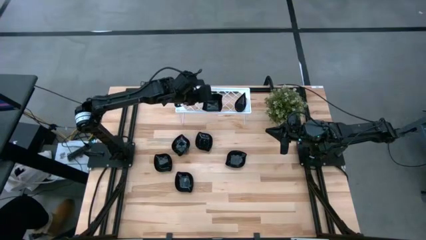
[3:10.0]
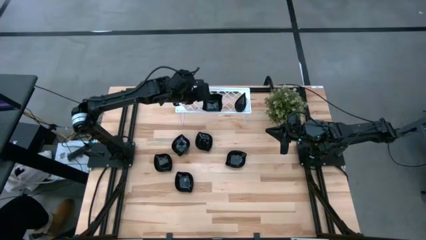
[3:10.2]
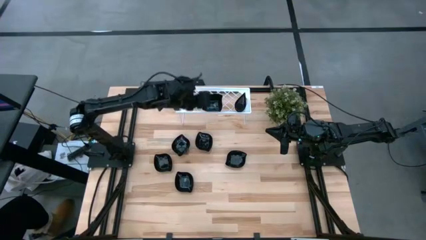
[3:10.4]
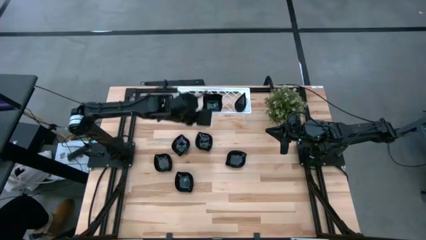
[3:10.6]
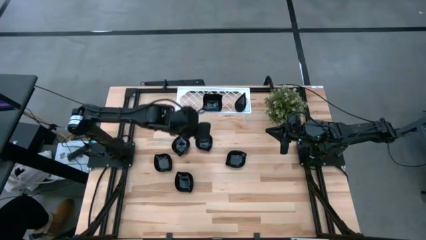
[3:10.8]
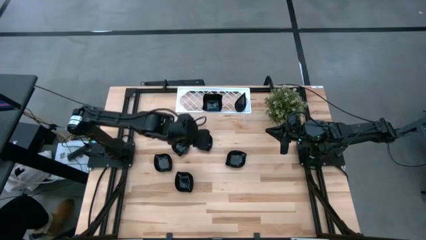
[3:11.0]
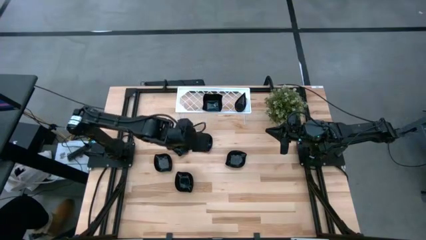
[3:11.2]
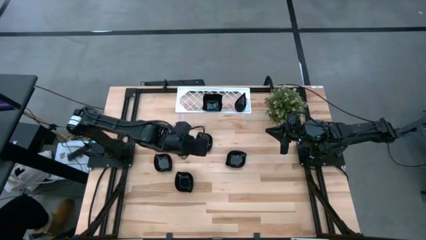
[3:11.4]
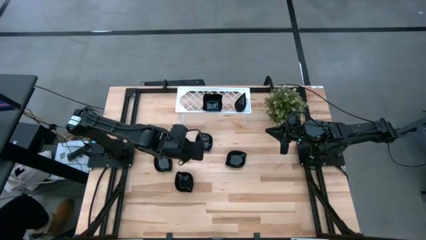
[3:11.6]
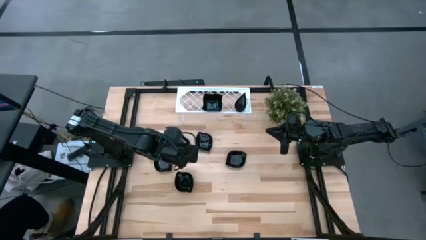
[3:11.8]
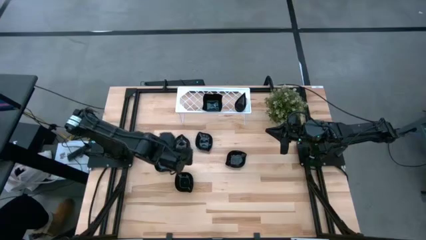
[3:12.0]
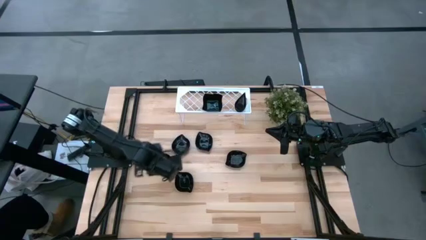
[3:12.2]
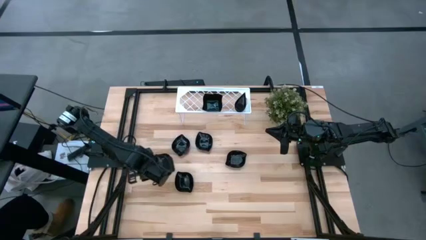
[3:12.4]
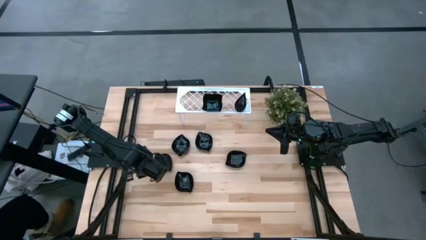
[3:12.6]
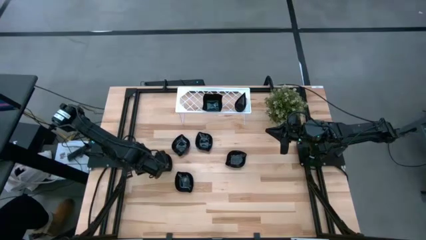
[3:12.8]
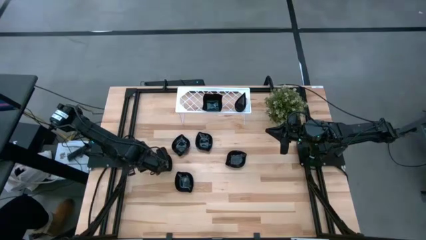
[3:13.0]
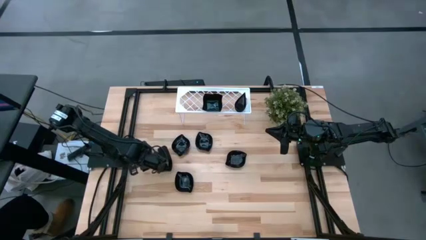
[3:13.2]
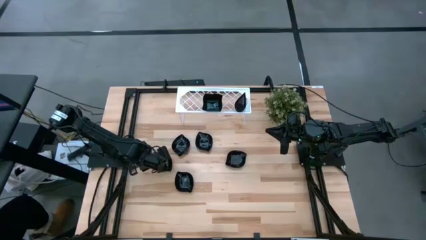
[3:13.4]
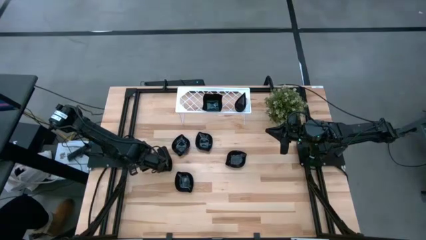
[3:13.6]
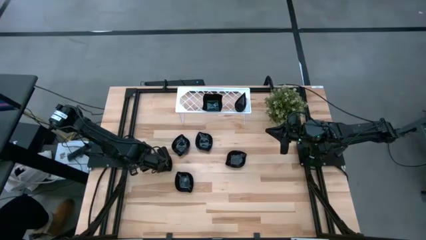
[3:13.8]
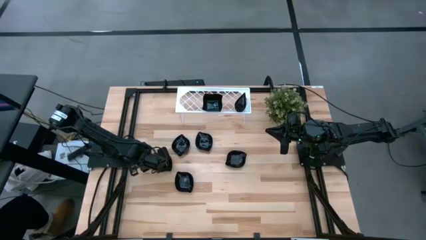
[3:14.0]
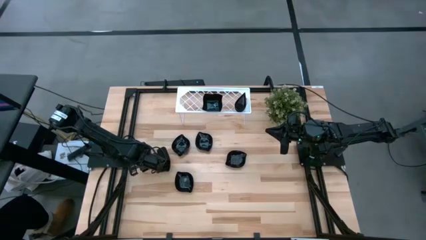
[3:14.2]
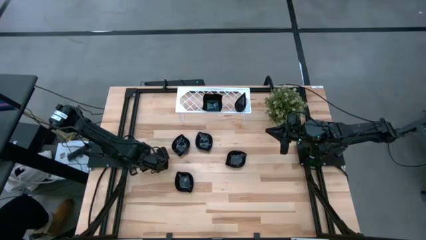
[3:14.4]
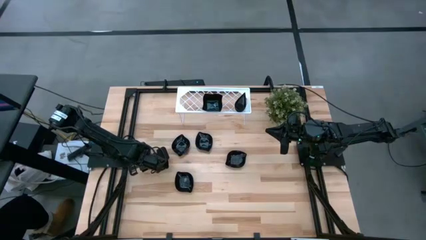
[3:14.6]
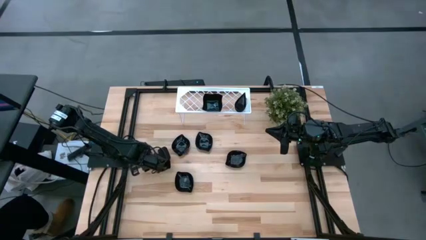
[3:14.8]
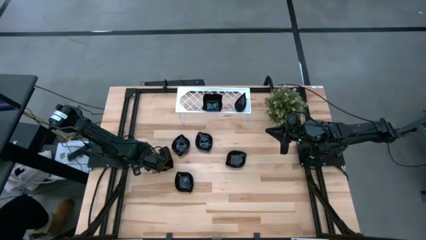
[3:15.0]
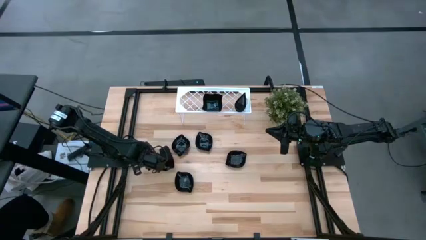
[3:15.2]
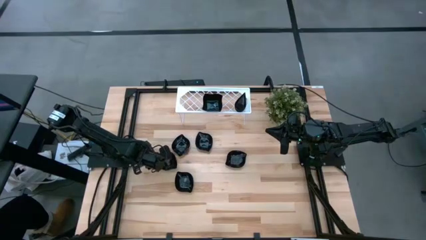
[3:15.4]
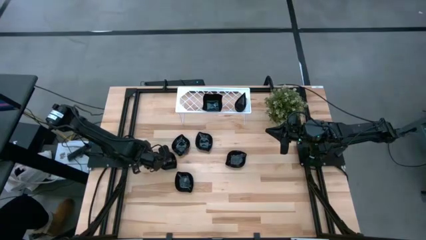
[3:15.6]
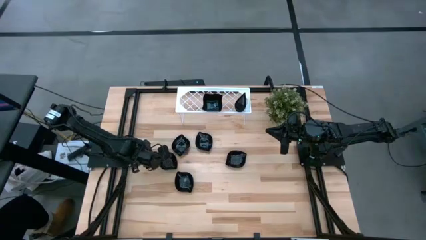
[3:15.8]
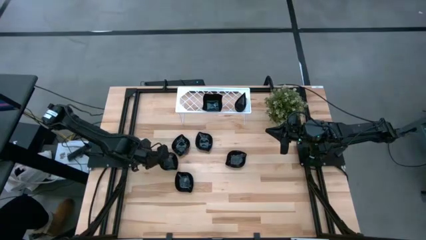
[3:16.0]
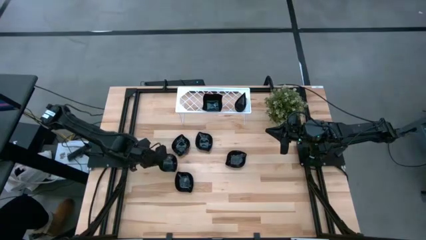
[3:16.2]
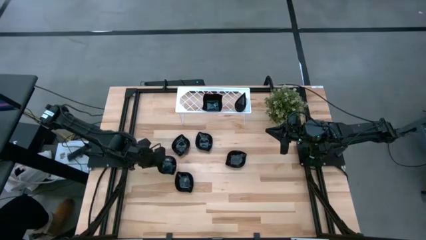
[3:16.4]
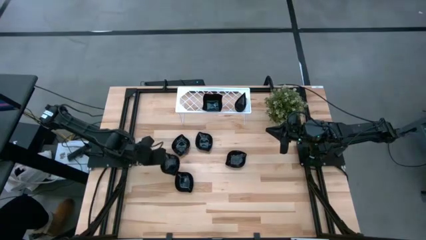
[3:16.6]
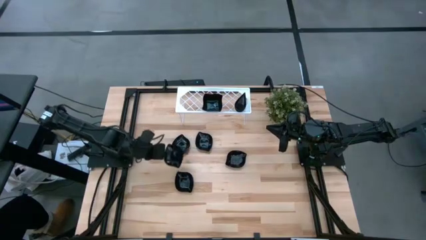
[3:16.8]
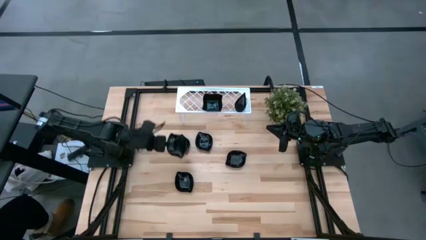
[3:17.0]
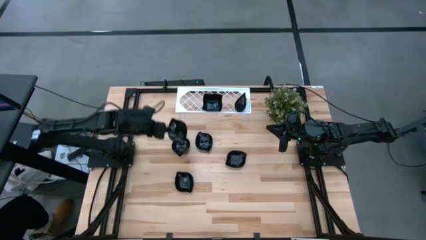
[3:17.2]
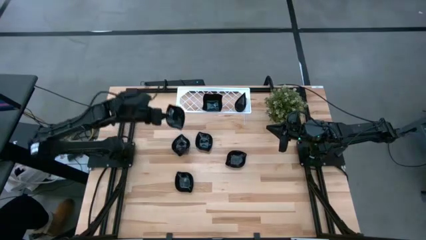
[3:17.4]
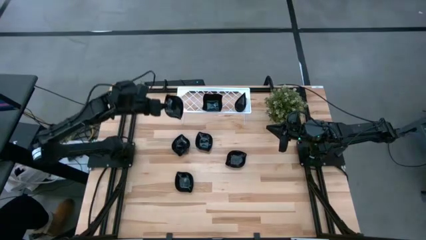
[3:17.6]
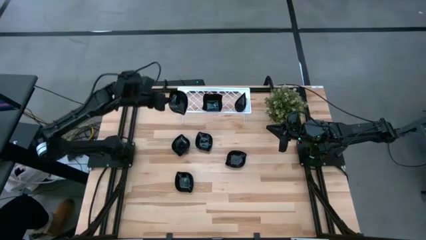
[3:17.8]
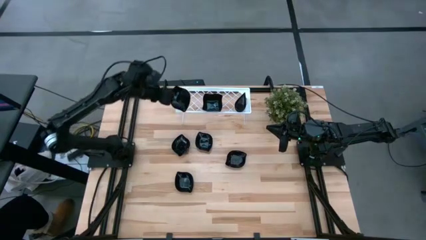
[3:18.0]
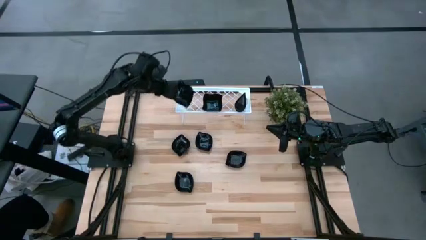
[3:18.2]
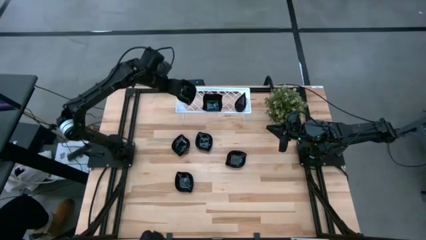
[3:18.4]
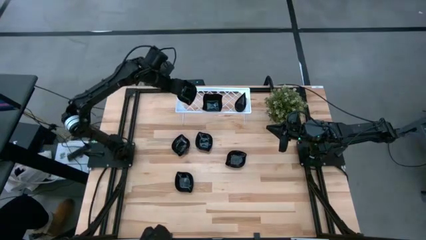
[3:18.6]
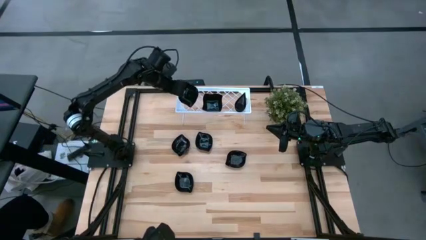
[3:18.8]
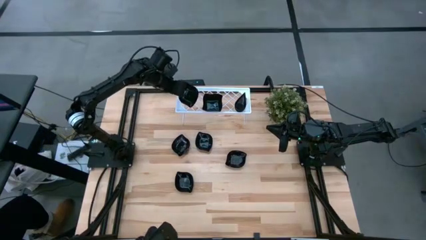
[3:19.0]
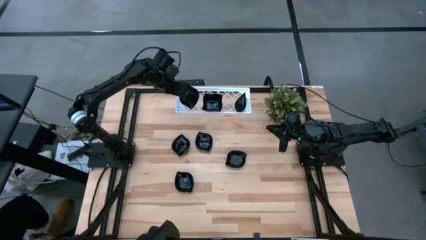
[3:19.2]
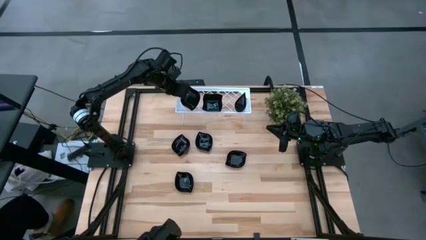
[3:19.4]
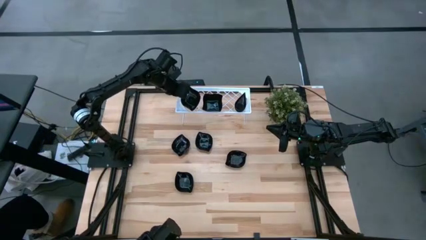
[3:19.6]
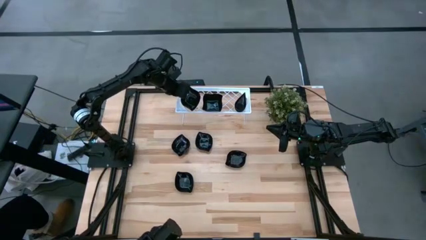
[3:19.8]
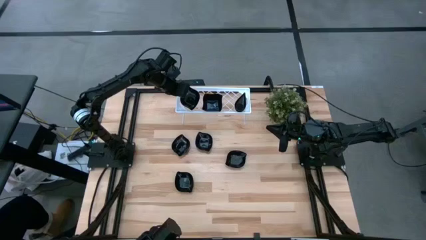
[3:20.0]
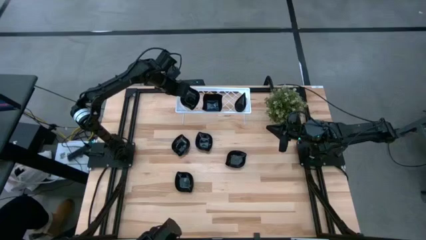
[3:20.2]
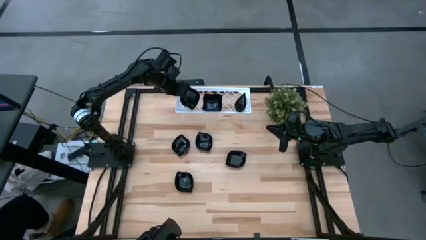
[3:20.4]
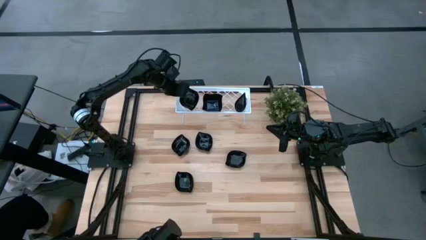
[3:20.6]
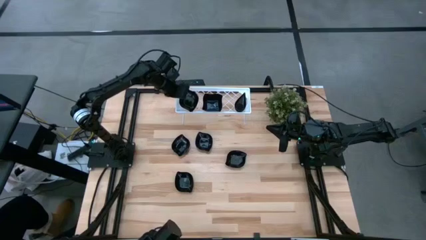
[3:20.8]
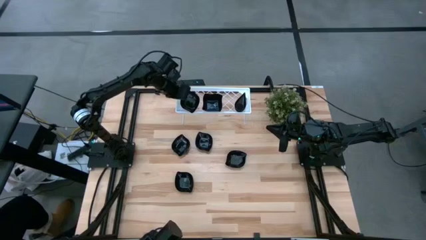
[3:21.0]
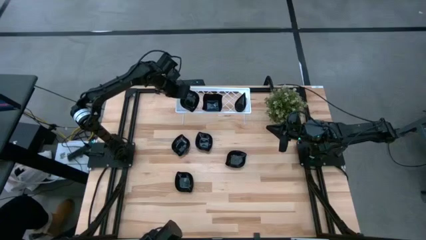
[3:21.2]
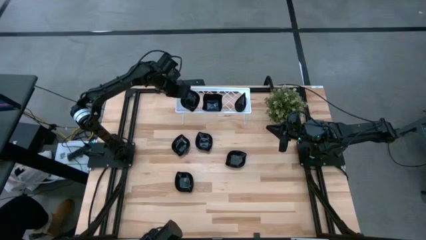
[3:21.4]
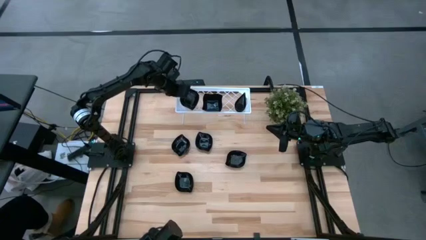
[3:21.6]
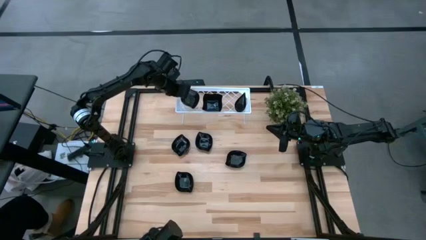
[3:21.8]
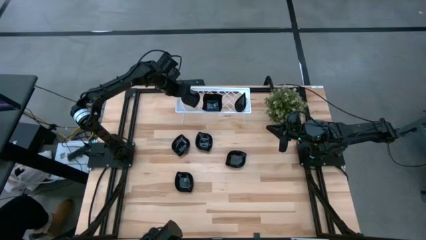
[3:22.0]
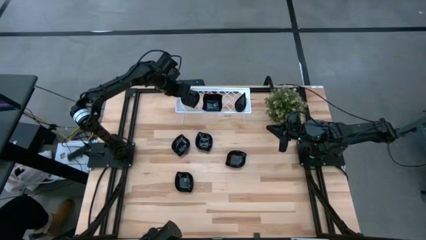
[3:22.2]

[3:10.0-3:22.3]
Task: Pick & Place Mini shaped plates
Put the leaf-shaped plate on the shelf
